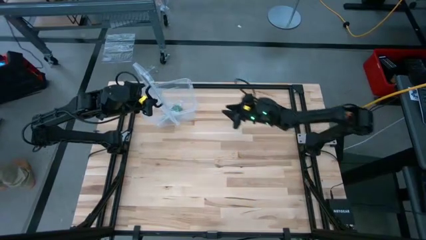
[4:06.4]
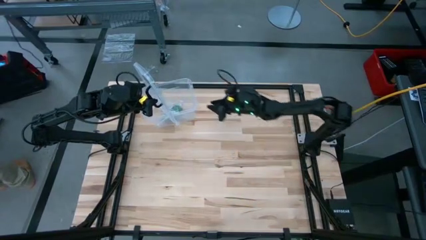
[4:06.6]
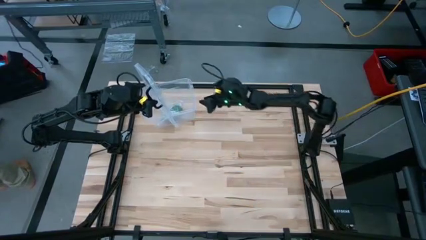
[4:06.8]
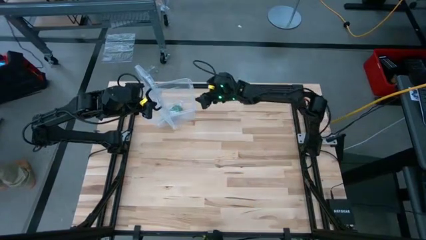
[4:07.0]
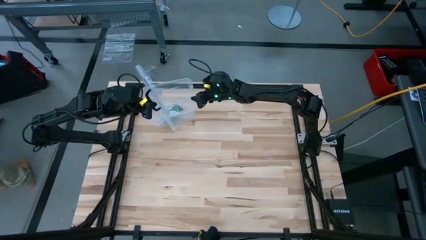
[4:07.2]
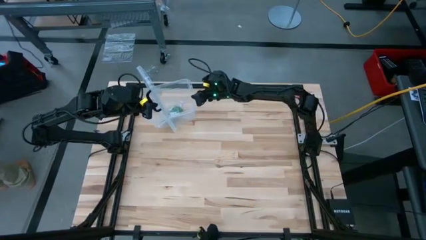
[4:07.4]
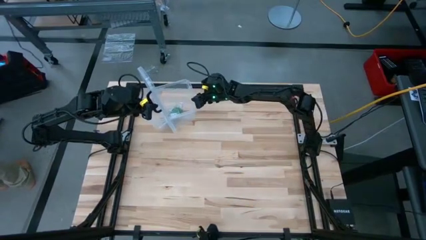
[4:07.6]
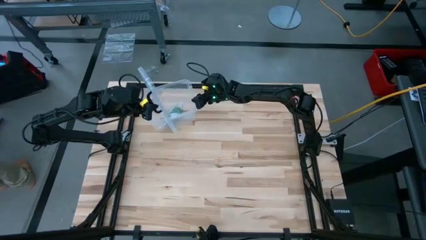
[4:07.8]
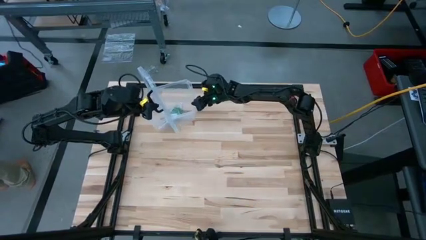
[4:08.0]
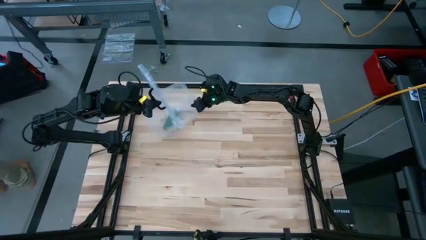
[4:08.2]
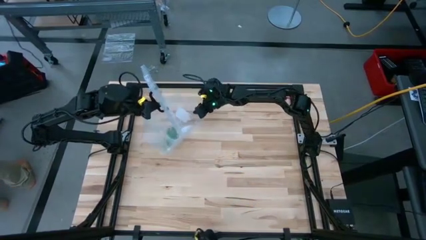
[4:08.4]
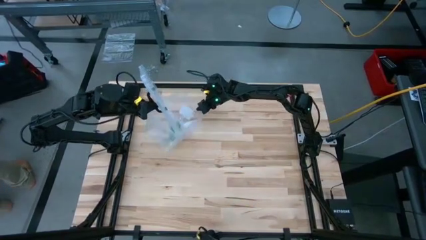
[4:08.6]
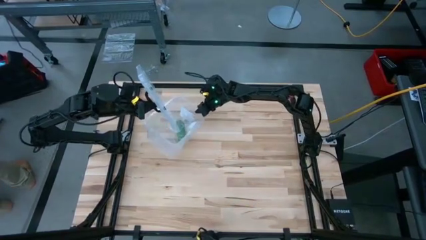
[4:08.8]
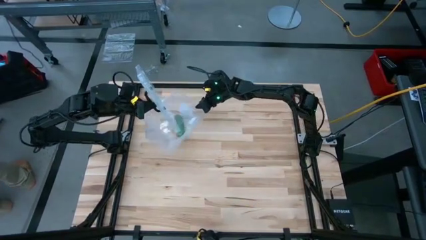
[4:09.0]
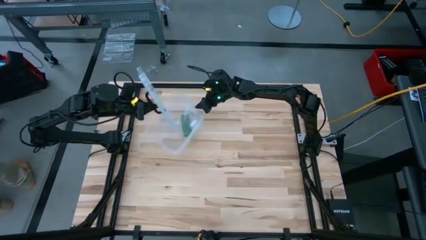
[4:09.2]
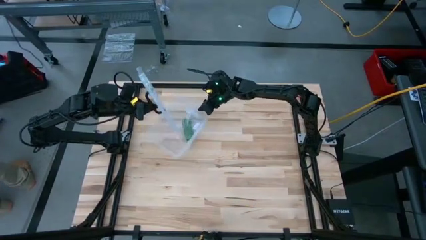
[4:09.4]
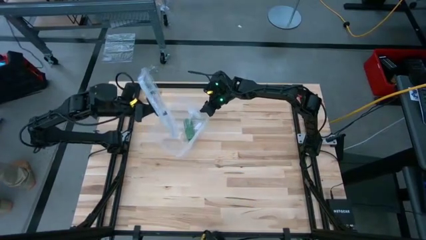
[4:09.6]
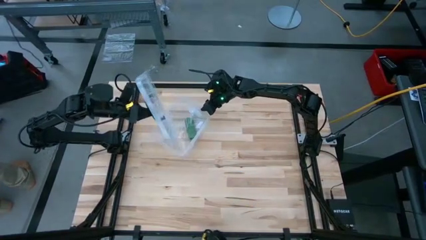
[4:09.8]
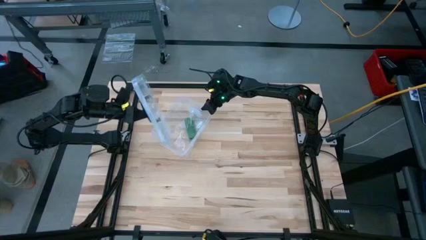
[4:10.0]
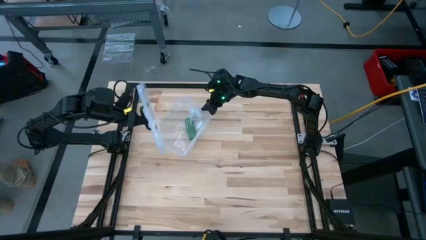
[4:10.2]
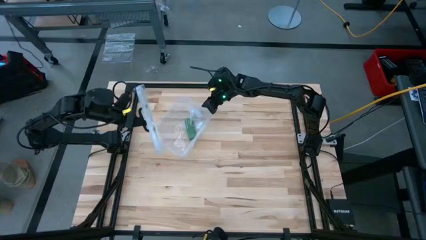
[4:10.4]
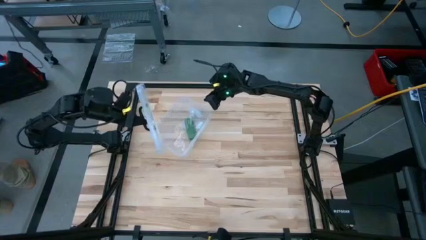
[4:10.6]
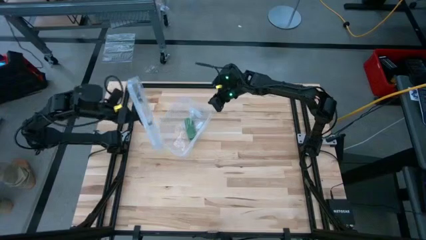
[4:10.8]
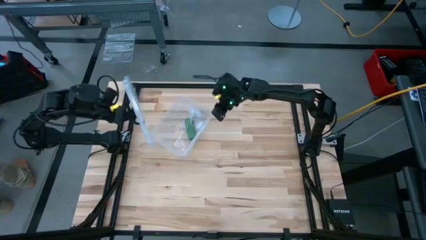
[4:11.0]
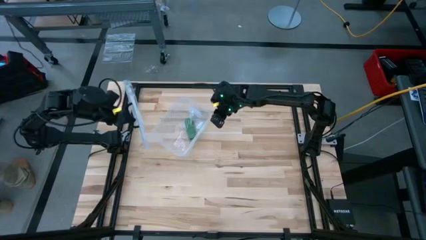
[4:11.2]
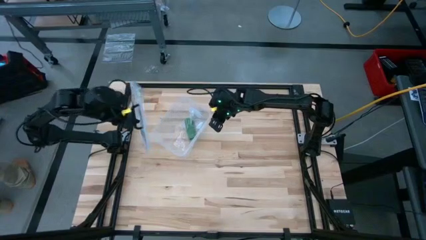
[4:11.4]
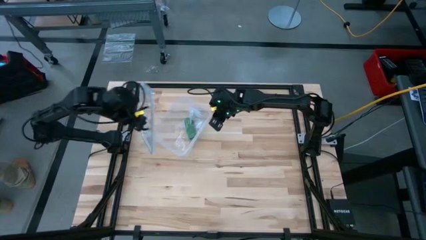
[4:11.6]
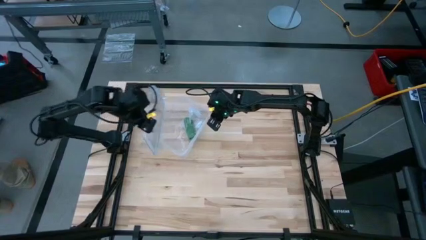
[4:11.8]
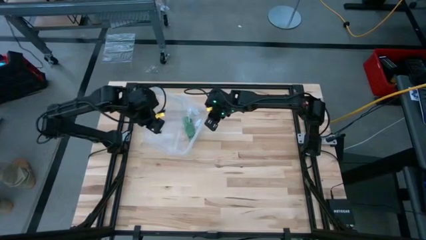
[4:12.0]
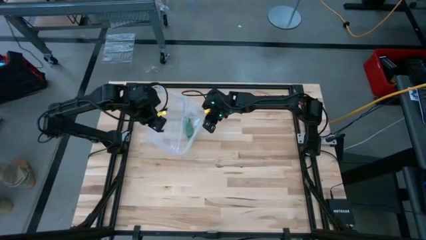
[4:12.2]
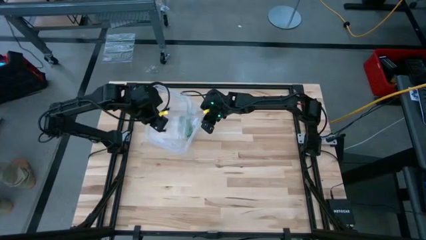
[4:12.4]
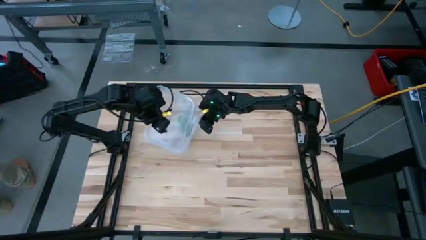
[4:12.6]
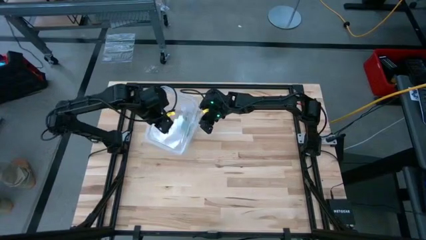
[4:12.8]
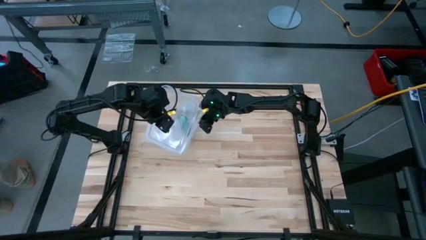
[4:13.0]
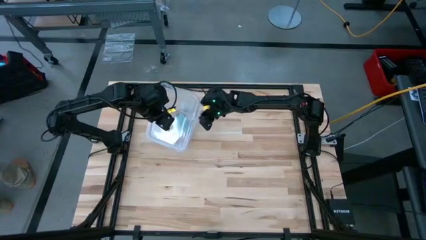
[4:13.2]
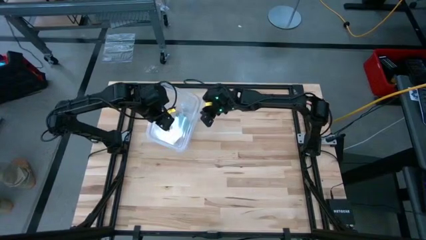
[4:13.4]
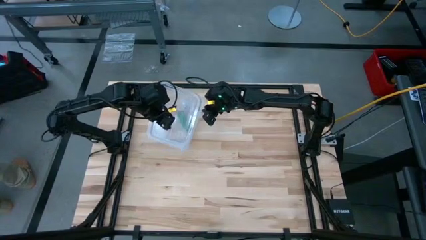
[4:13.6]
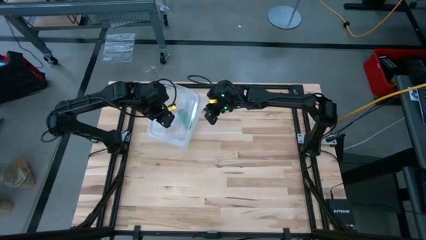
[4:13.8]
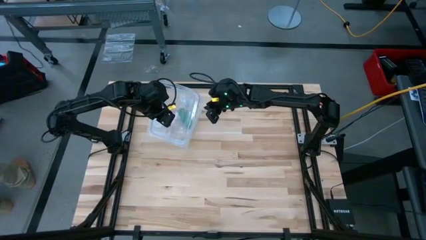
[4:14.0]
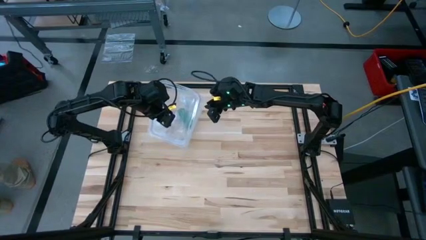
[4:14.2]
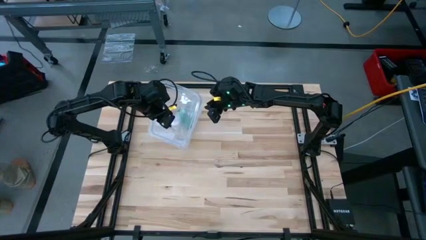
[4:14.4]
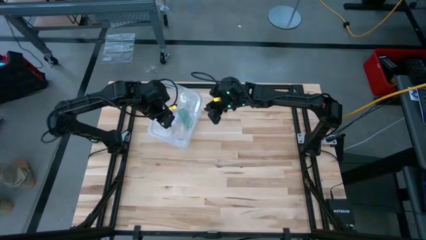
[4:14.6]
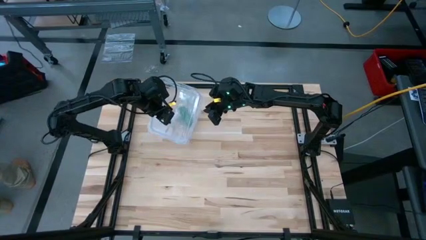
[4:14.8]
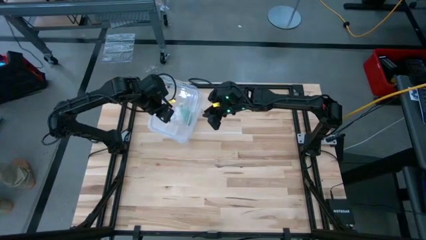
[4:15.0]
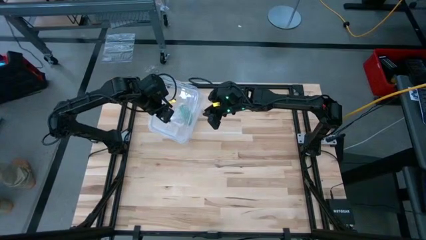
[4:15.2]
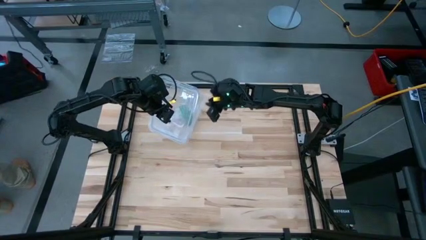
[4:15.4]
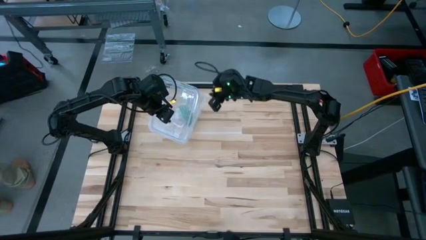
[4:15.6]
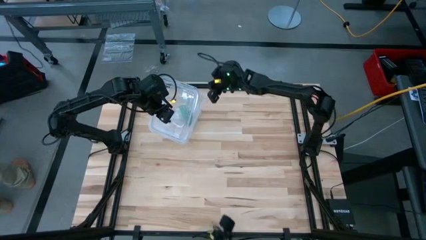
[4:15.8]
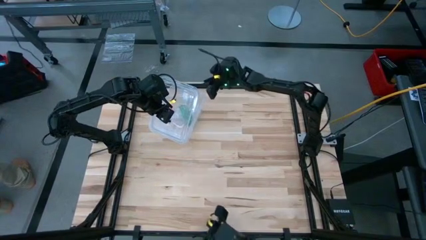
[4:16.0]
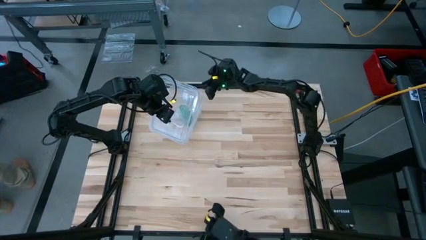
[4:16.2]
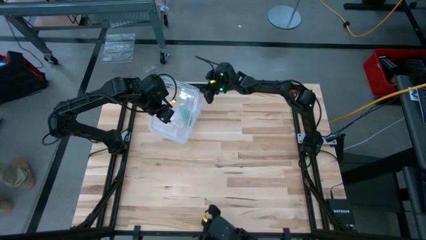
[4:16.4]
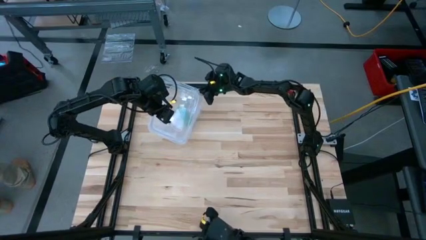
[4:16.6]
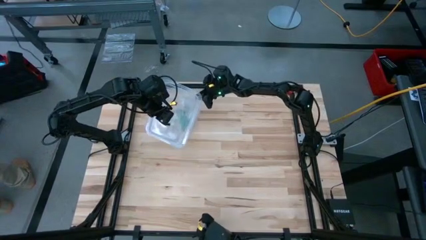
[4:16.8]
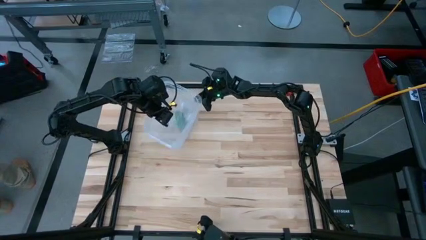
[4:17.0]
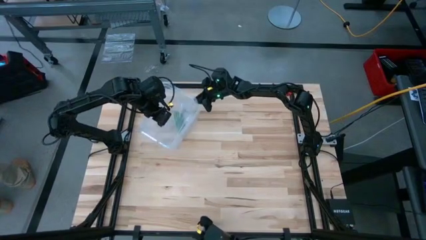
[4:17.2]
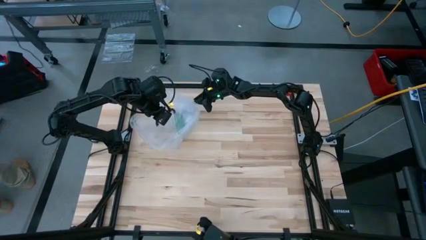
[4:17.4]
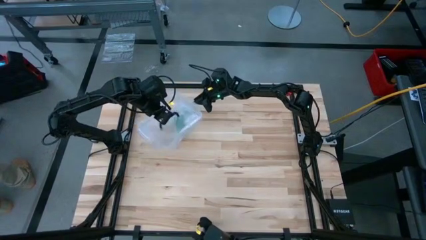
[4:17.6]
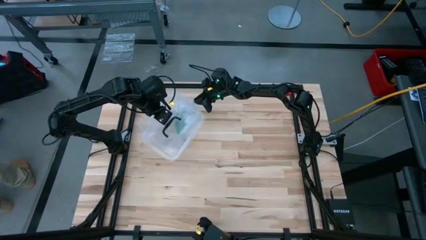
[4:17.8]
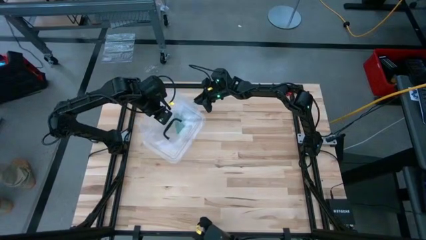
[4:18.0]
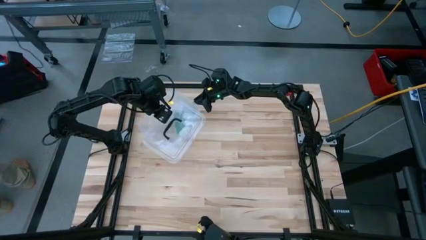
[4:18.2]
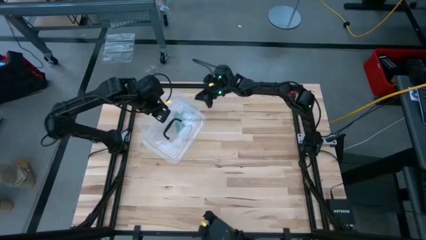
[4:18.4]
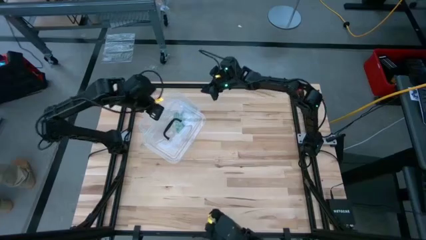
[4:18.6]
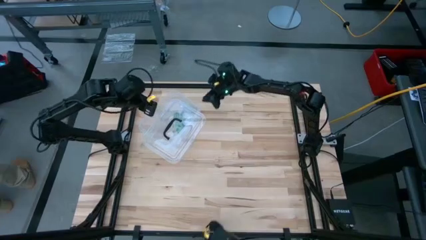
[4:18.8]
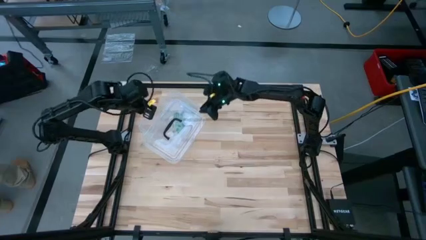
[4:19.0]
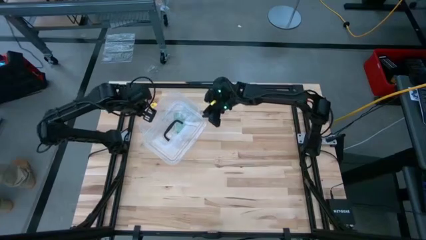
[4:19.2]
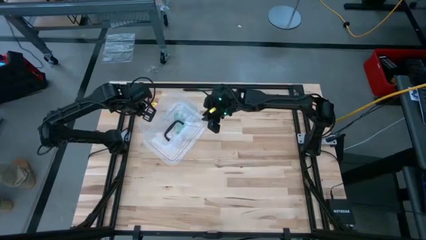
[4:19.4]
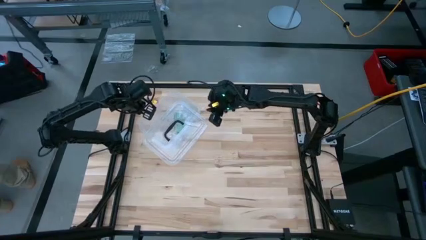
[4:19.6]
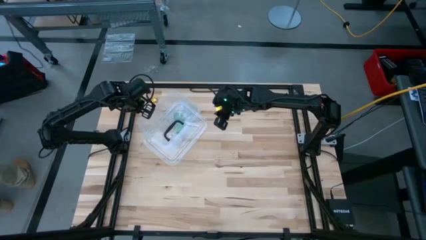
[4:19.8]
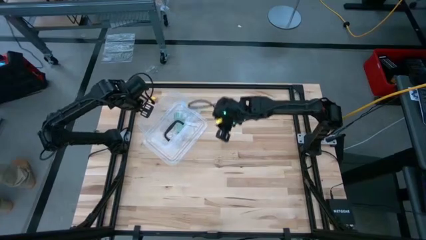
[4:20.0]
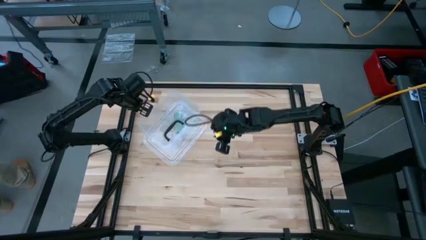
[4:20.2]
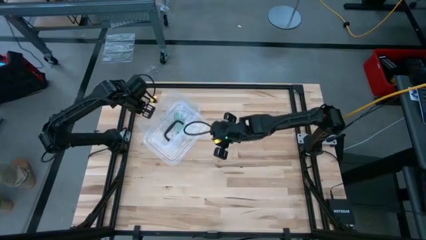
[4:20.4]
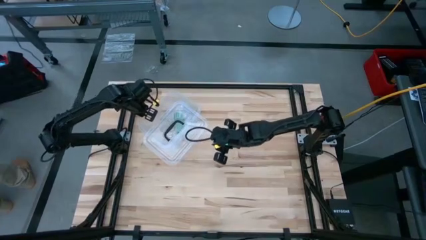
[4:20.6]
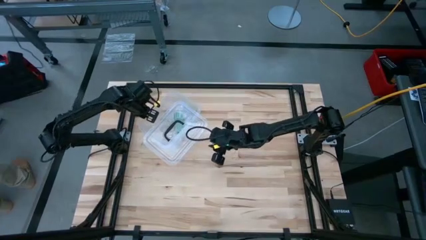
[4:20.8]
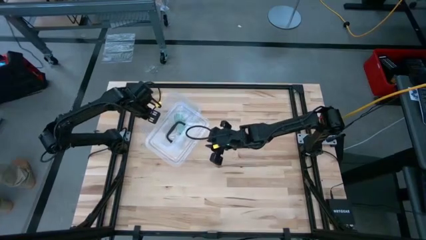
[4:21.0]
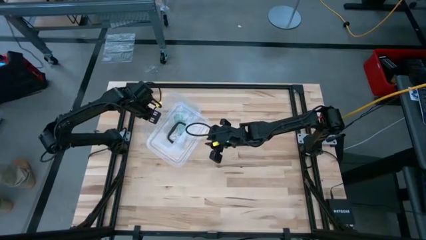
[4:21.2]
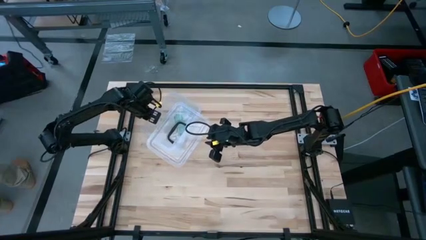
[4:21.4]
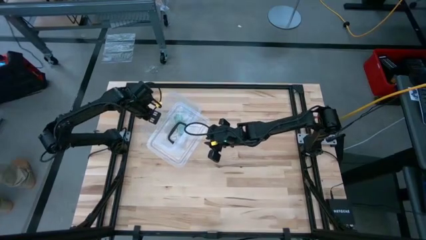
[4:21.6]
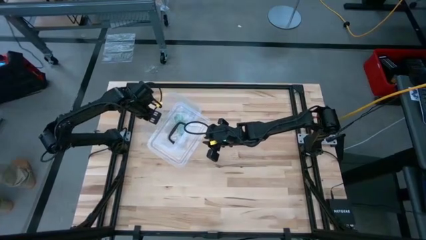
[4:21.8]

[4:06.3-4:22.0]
Task: Roll bandage
Close the transparent bin with the transparent bin cover
